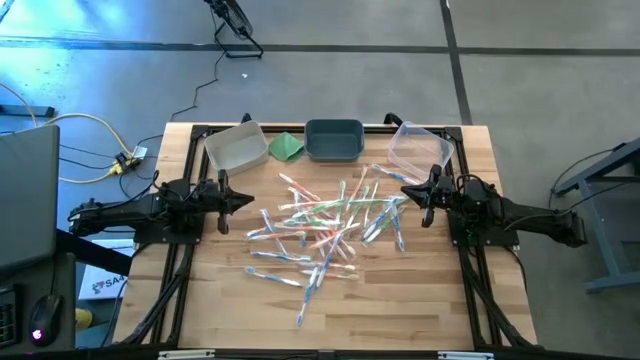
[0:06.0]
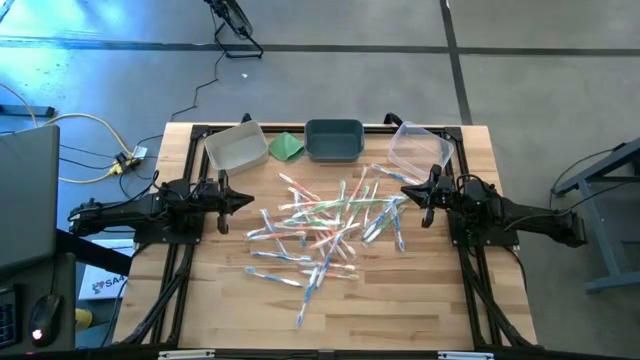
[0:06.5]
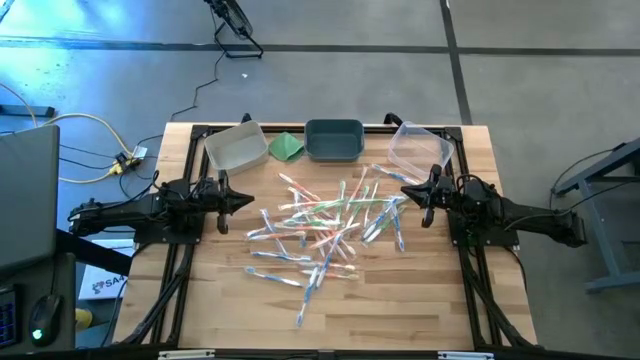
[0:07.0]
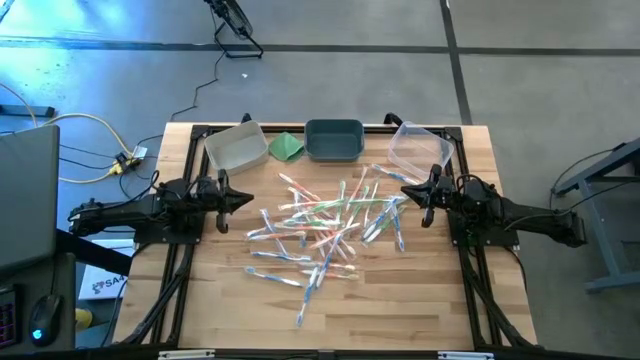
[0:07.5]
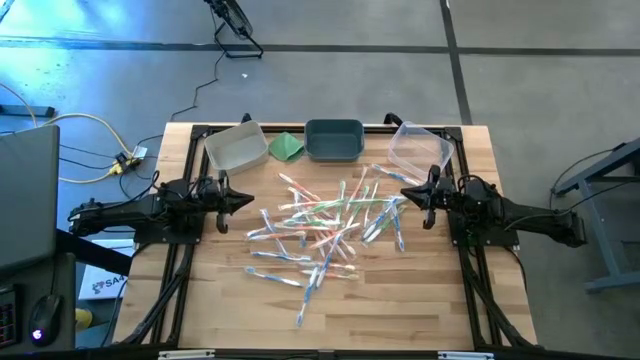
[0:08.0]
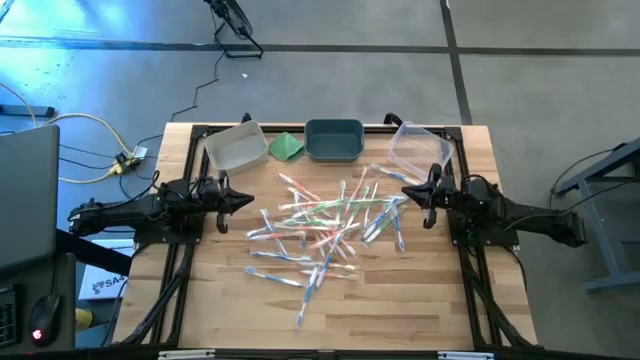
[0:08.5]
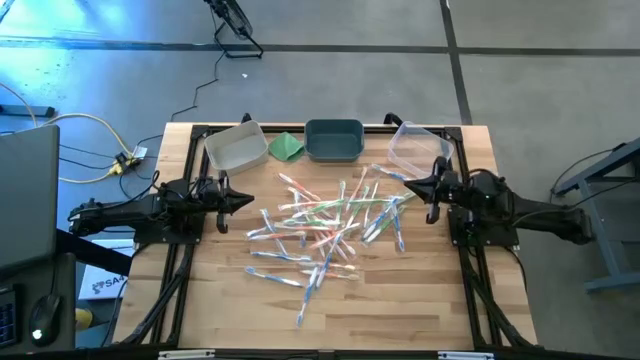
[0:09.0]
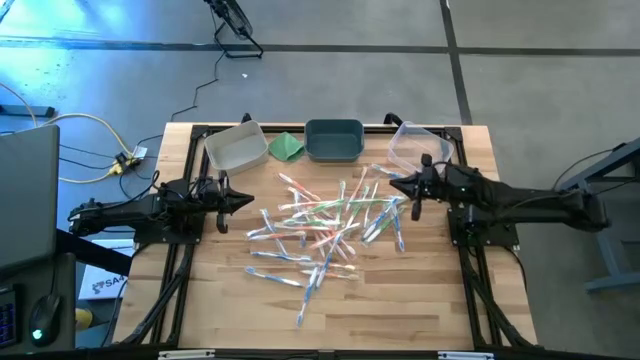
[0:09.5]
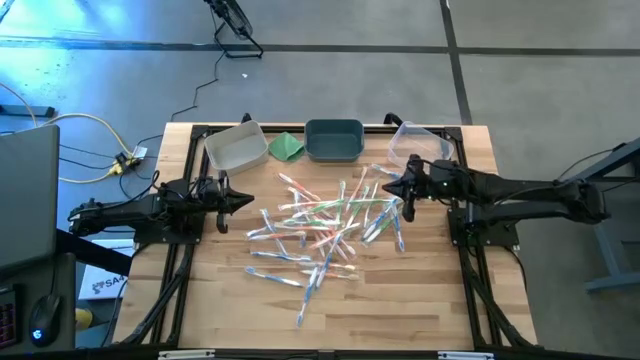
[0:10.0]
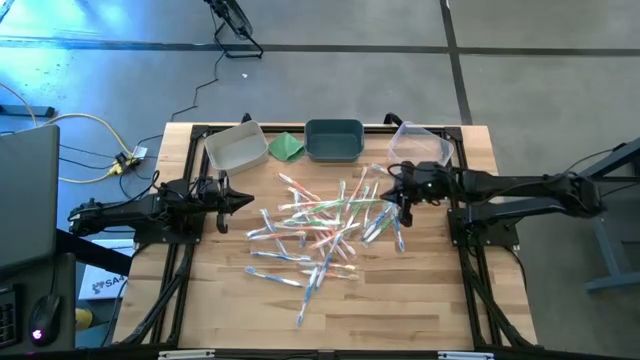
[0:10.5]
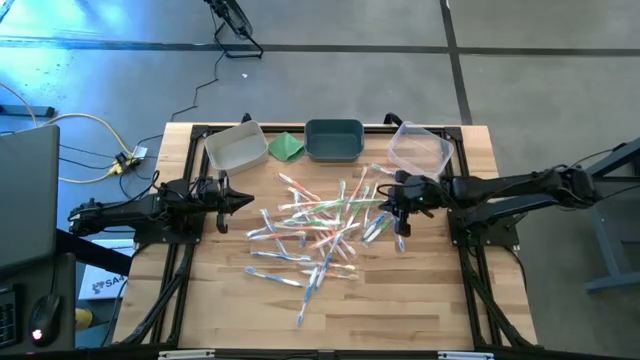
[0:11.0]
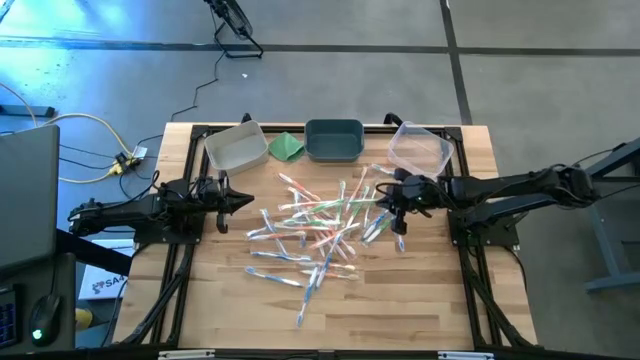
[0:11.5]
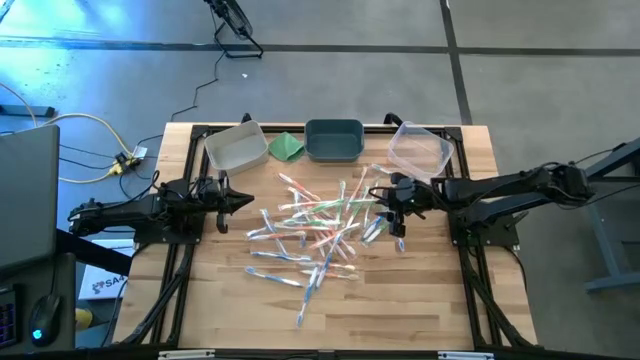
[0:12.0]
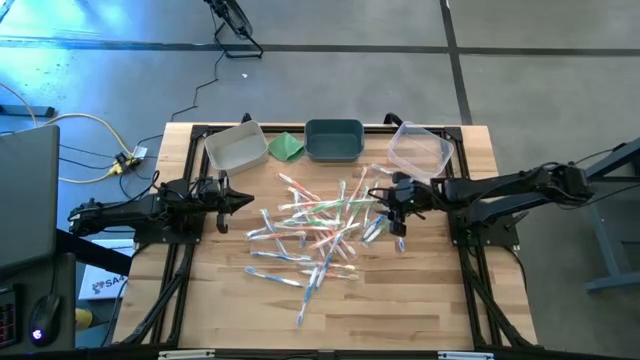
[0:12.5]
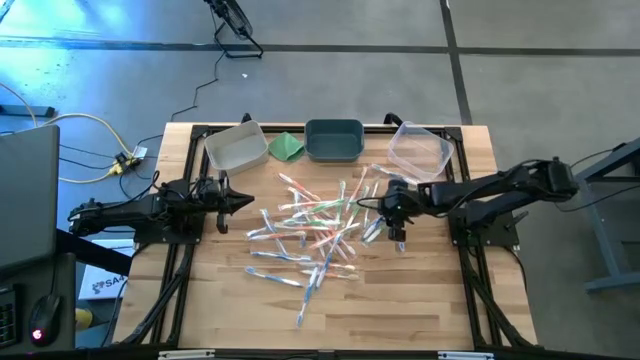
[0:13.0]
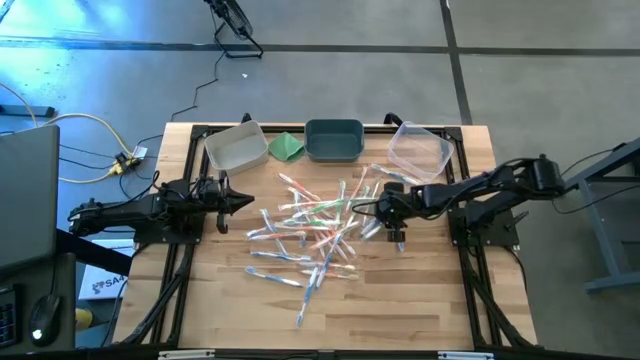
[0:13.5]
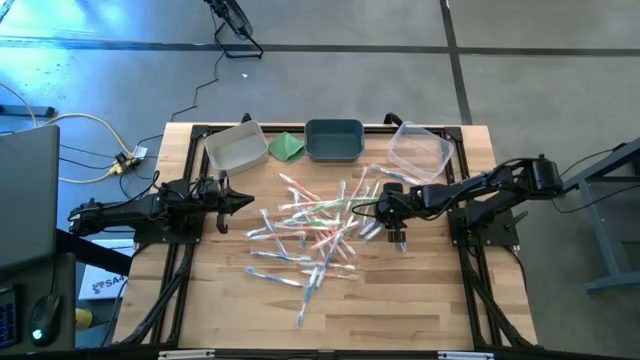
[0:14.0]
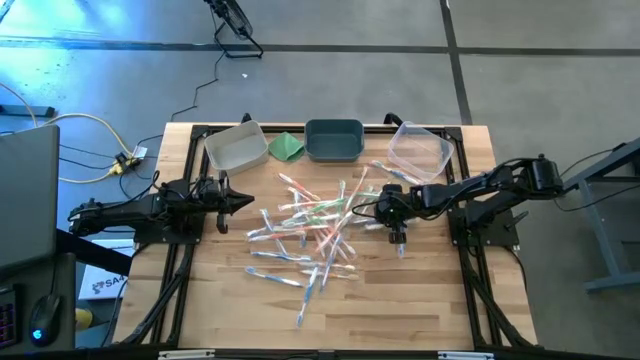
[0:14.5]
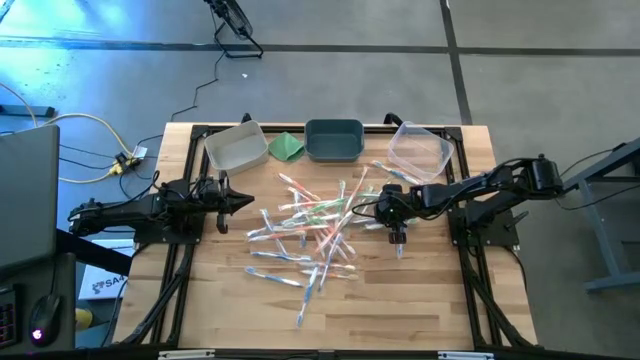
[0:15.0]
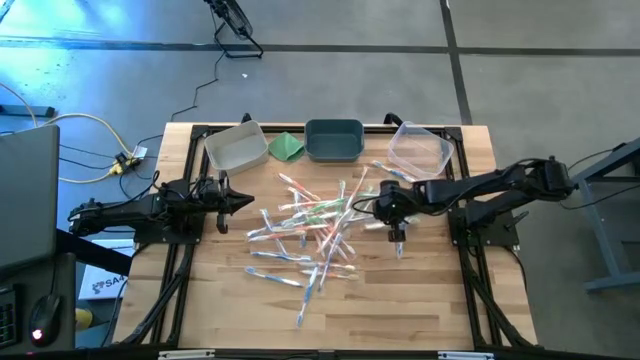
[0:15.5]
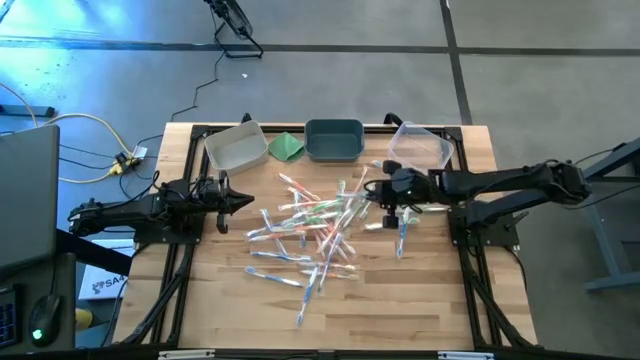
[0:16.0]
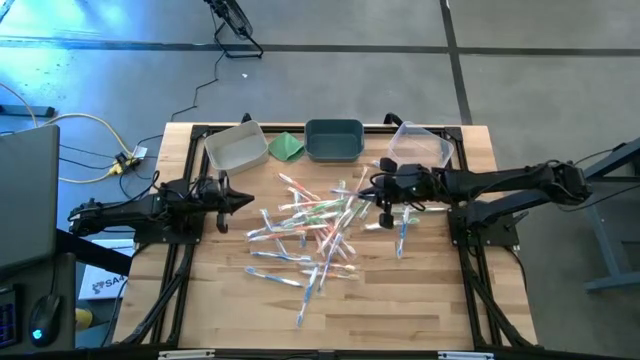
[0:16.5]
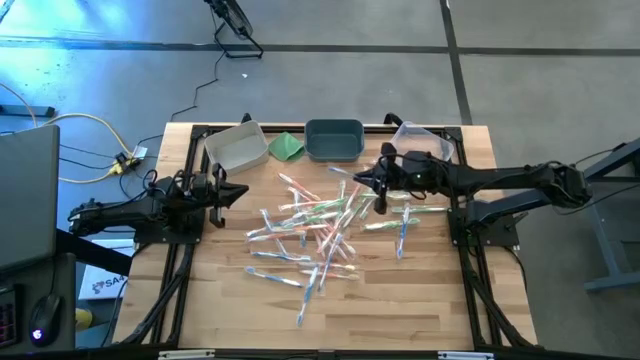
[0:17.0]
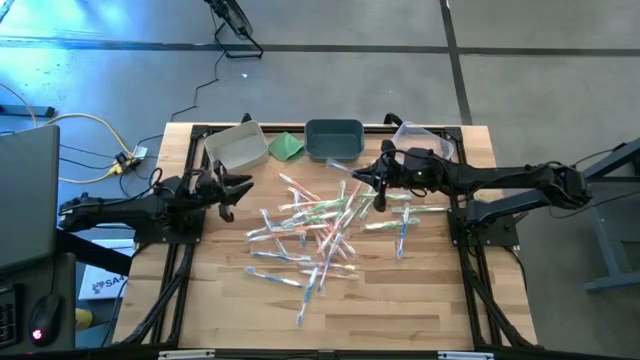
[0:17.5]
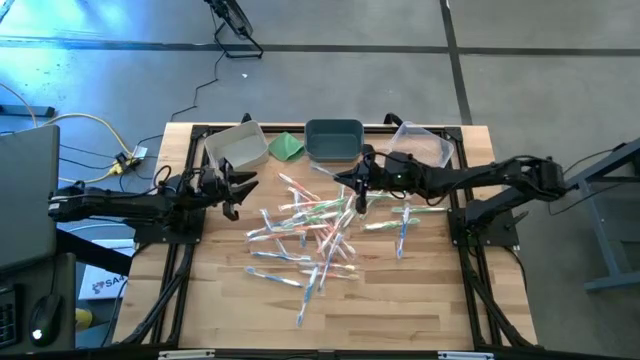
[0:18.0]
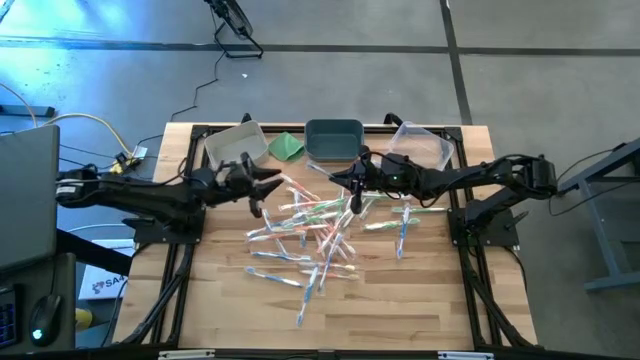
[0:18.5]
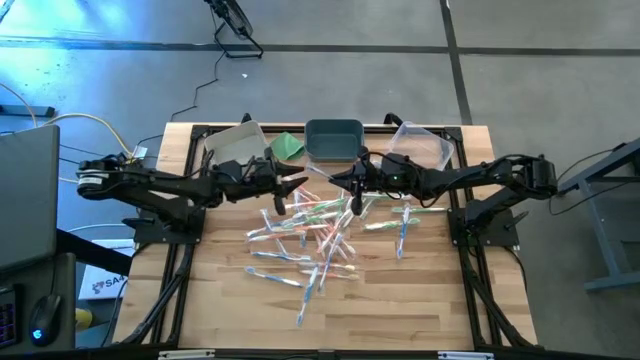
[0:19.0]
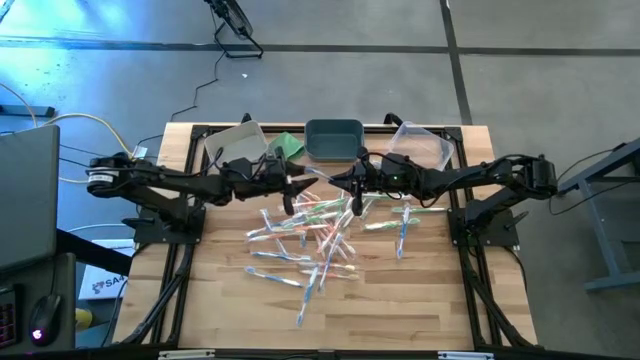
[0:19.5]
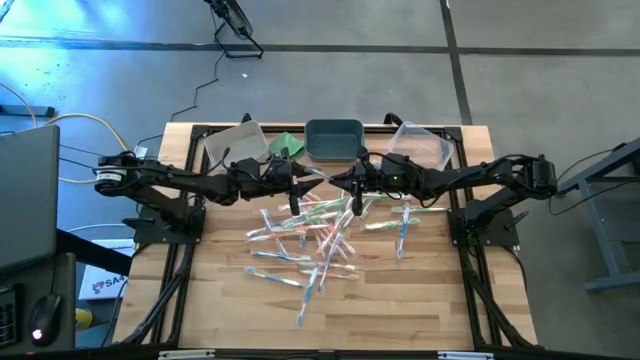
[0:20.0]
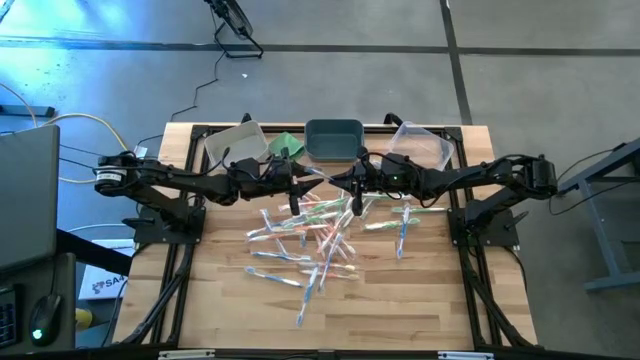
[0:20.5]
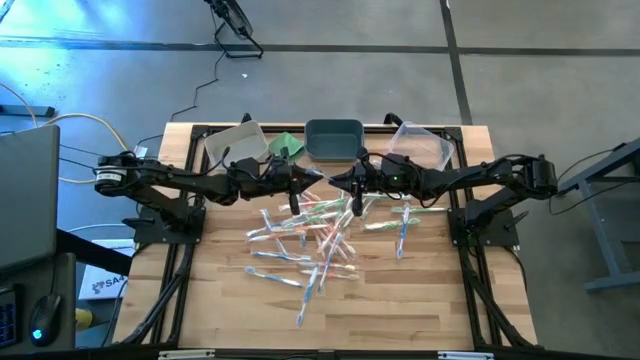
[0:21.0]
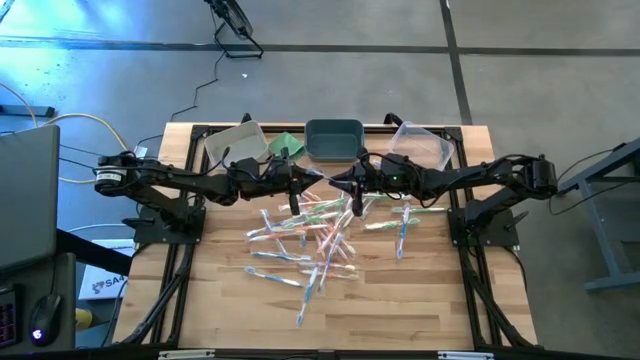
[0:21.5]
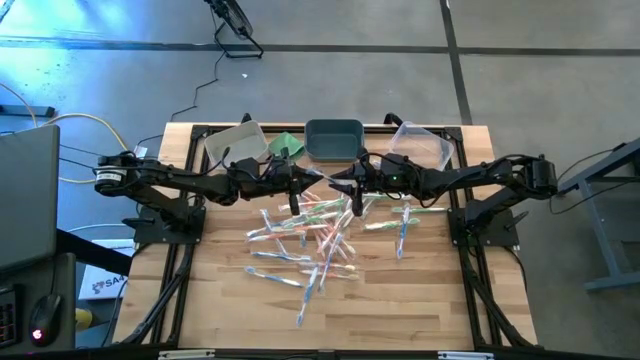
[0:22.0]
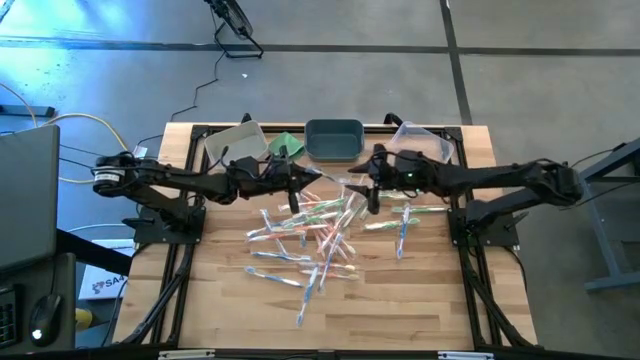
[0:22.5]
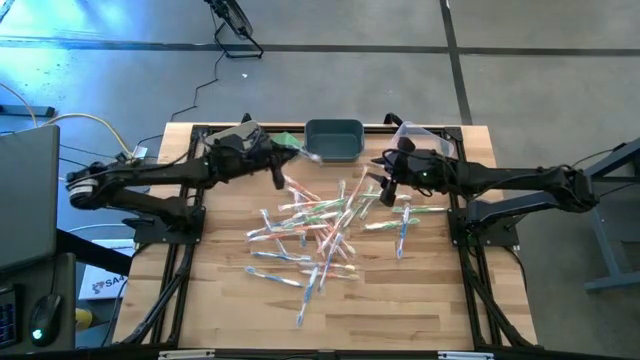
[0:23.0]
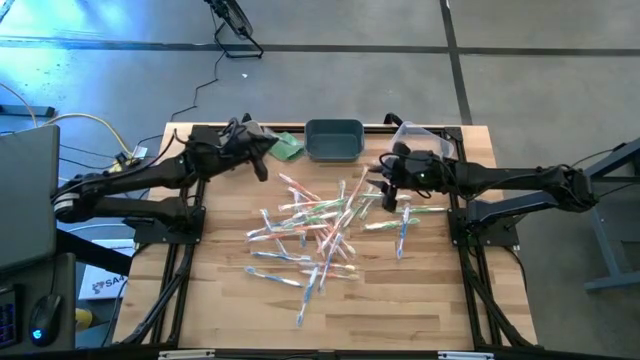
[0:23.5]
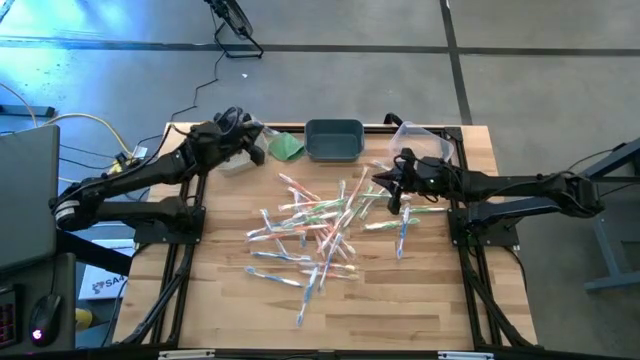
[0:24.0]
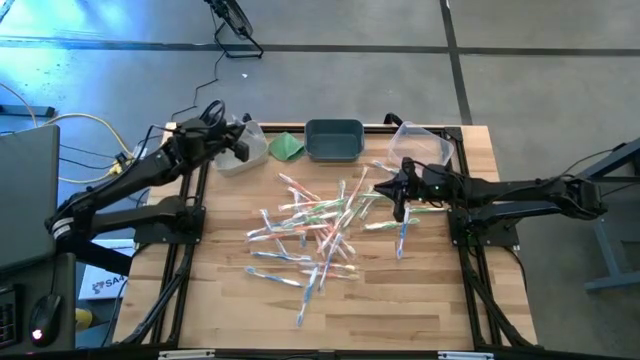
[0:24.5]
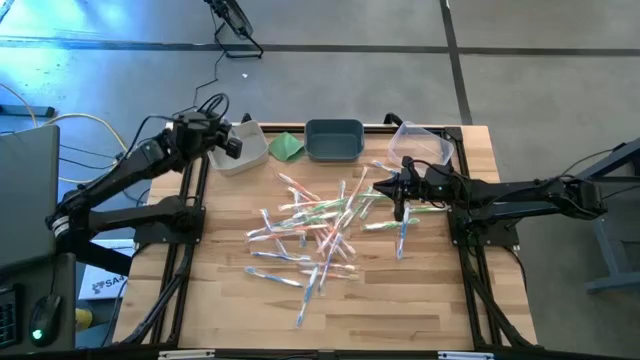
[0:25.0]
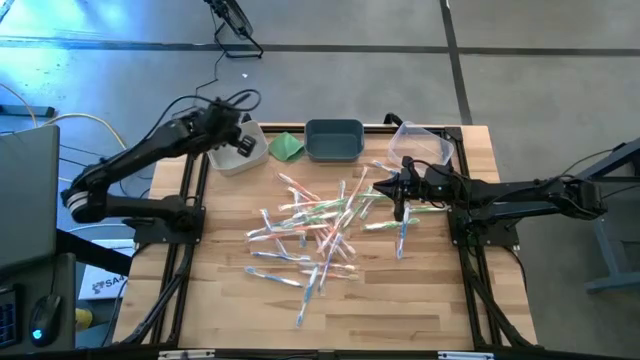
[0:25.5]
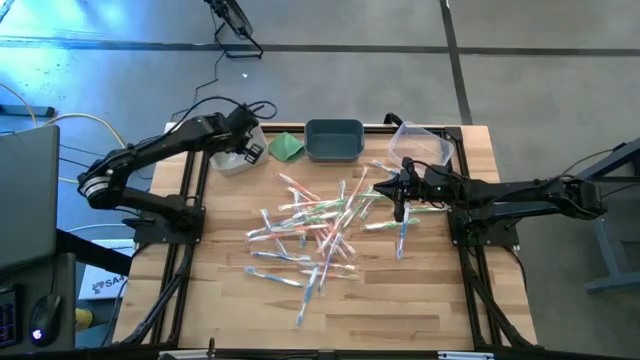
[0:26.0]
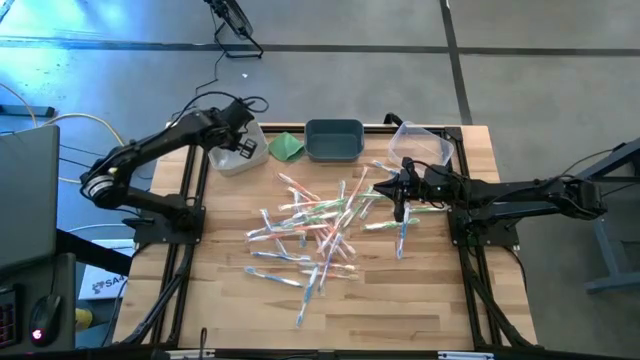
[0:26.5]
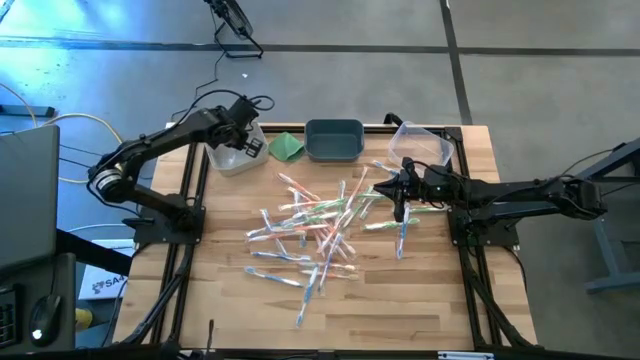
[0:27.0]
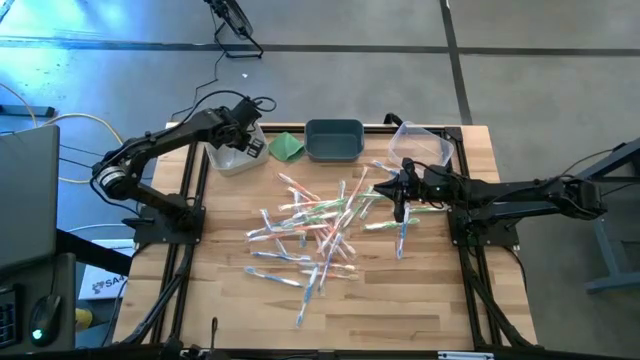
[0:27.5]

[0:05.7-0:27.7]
Task: Pick & Place Toothbrushes
Put the blue toothbrush into the gray bin
